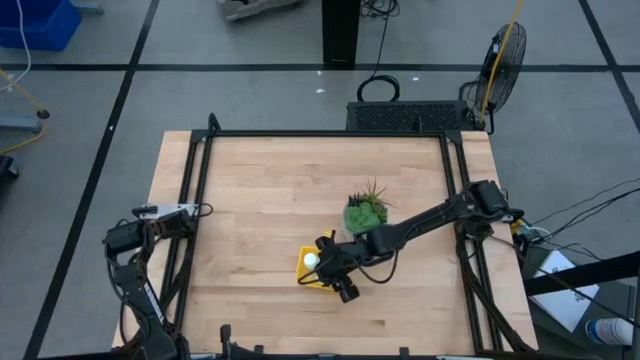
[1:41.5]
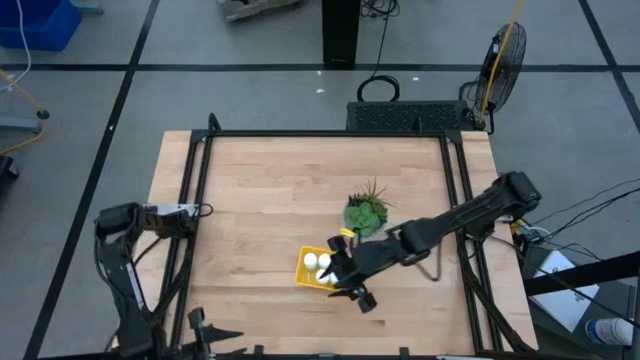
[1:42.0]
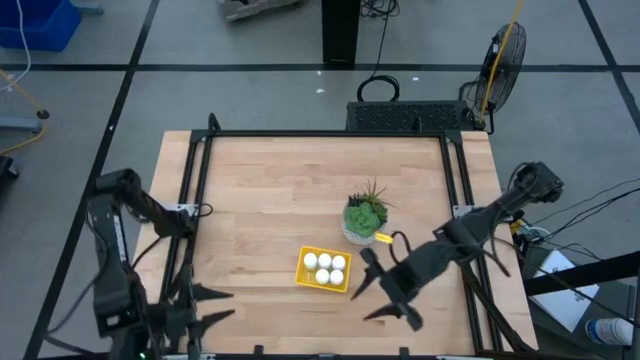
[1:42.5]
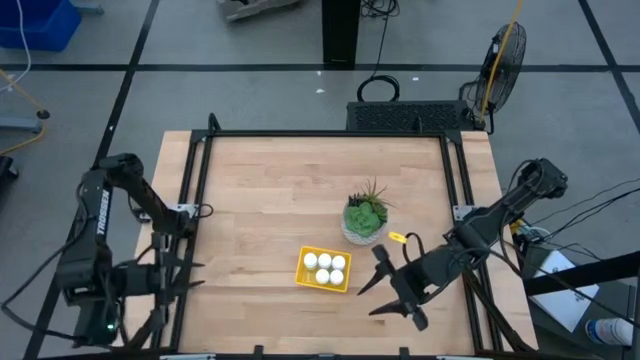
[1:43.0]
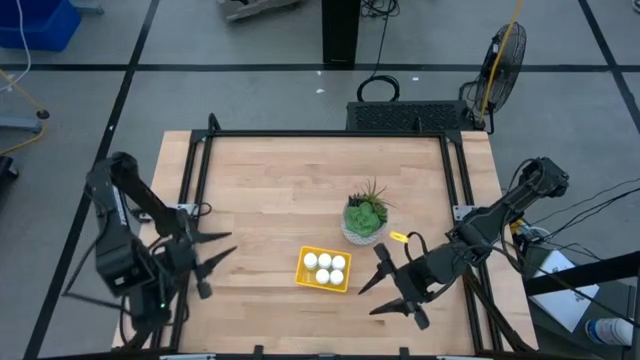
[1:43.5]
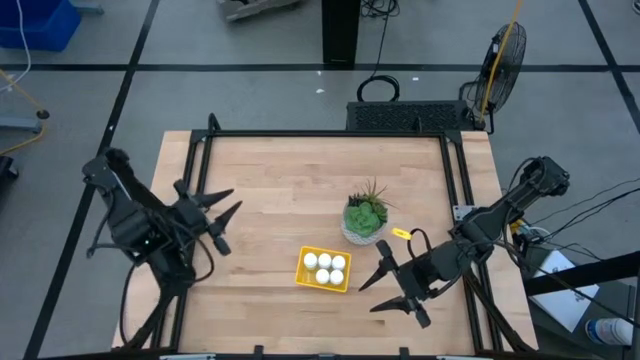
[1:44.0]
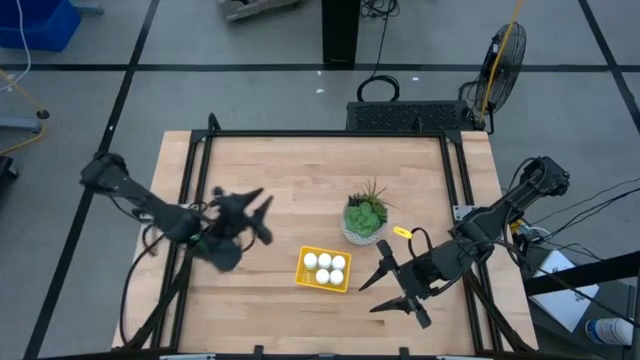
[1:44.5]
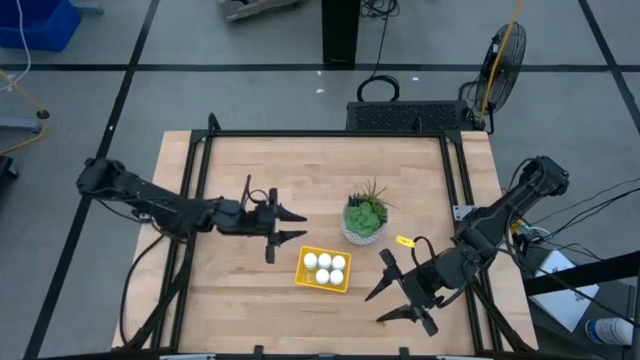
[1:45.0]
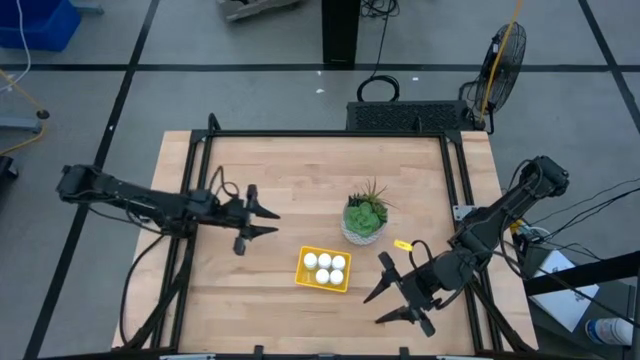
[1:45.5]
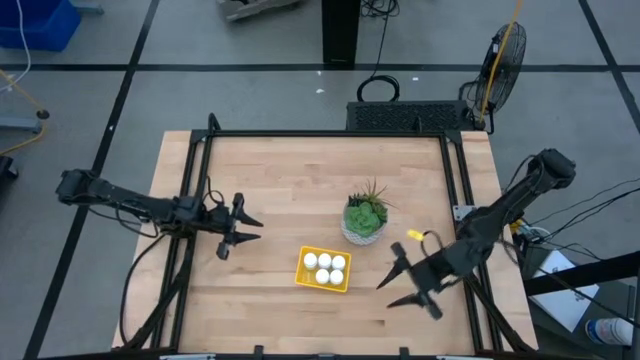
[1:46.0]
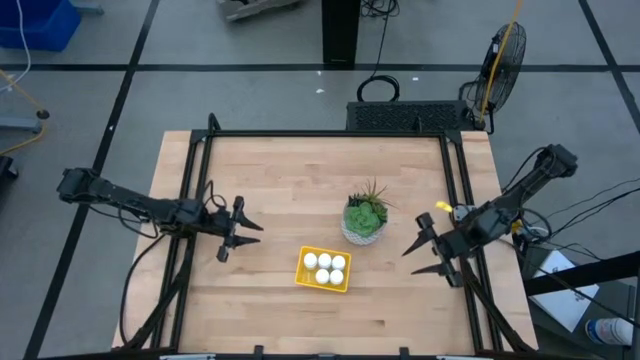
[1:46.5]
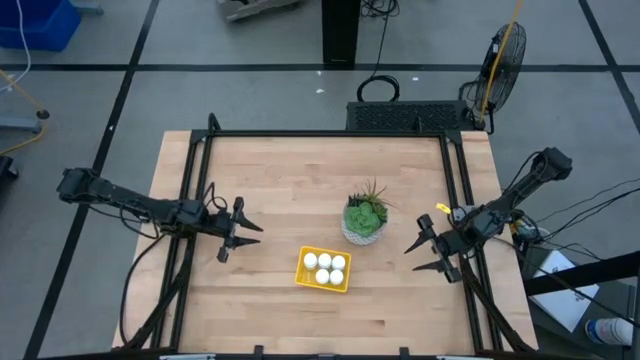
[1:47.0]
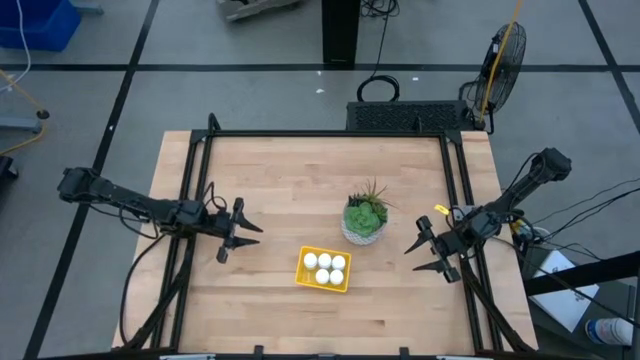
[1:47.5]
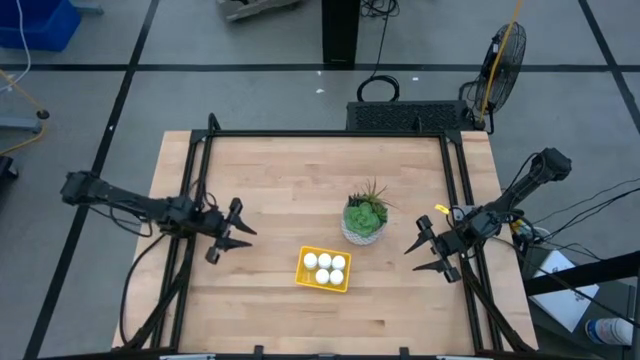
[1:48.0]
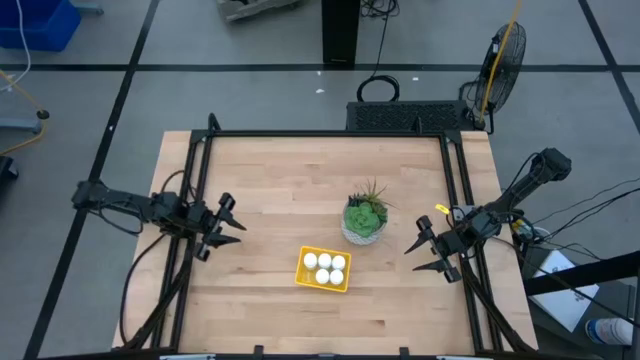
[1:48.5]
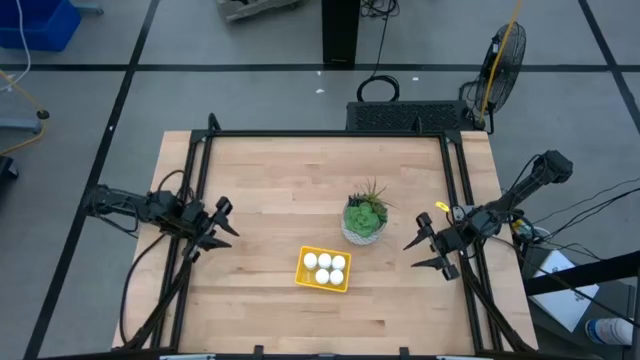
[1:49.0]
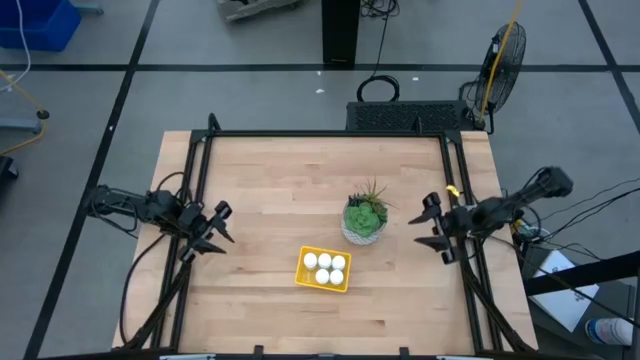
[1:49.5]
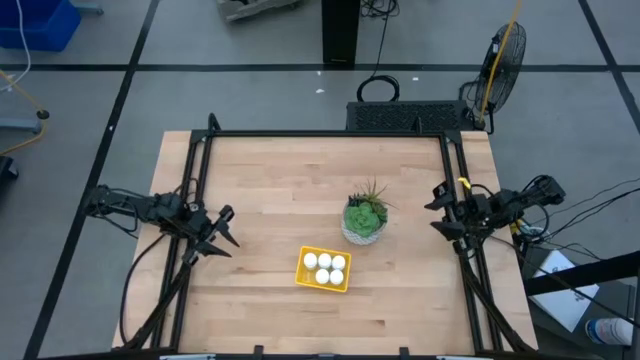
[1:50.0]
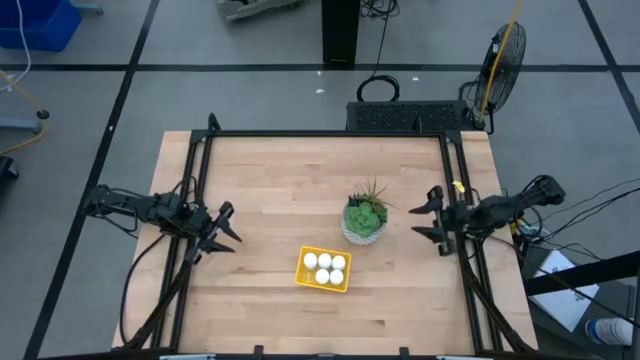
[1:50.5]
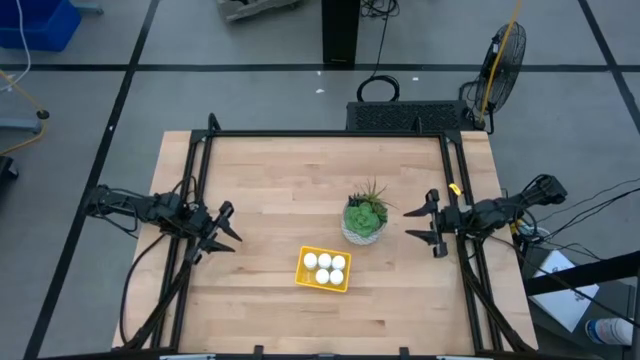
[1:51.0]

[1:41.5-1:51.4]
Task: Pick and place pill bottles into a basket
Return to Home Position

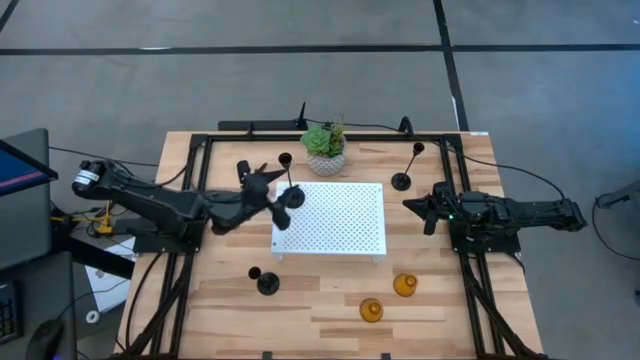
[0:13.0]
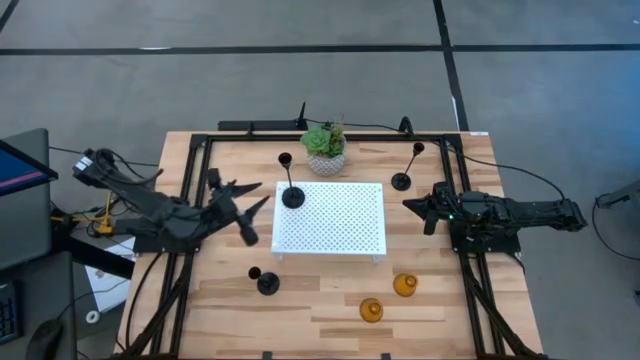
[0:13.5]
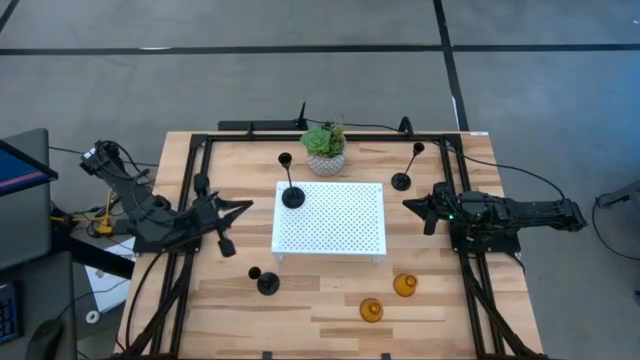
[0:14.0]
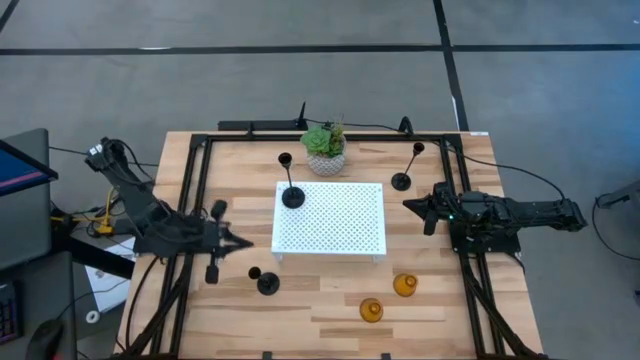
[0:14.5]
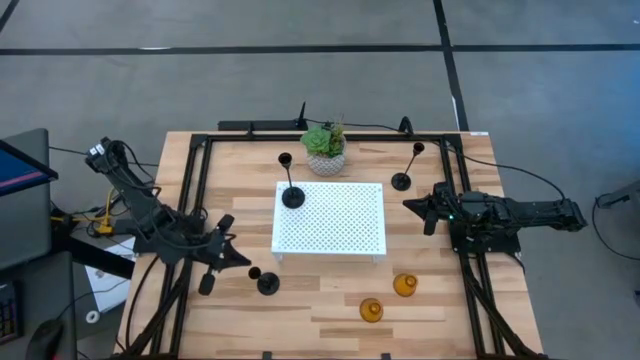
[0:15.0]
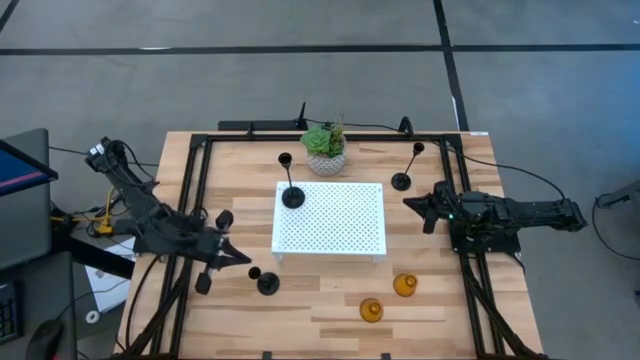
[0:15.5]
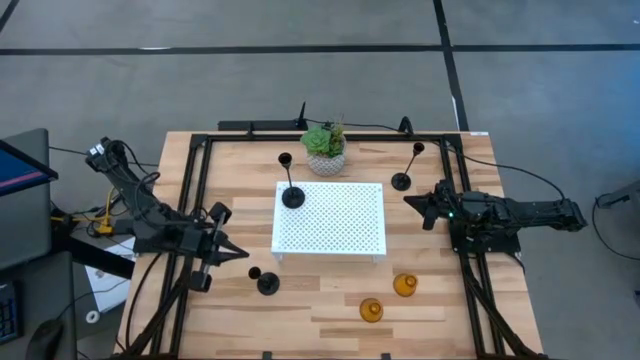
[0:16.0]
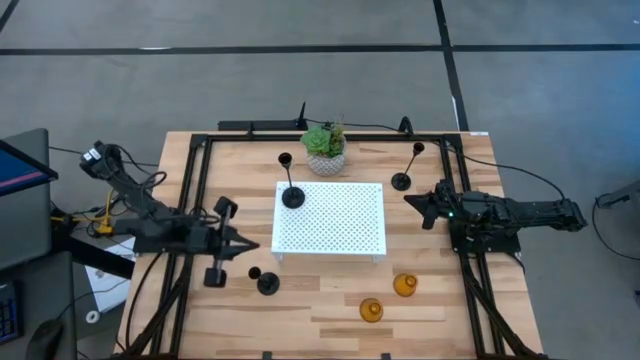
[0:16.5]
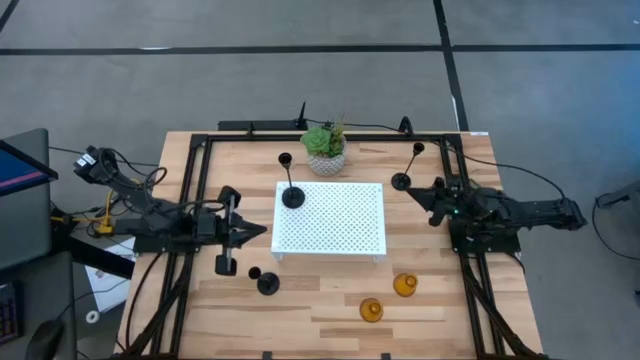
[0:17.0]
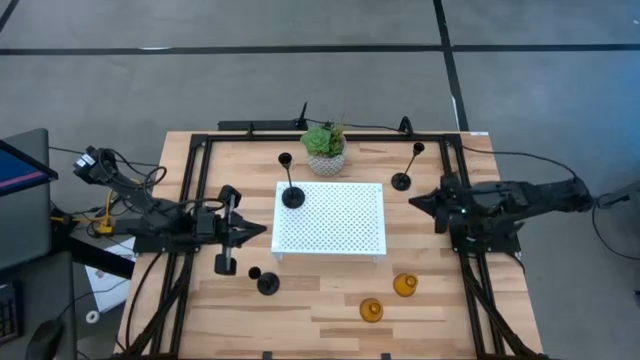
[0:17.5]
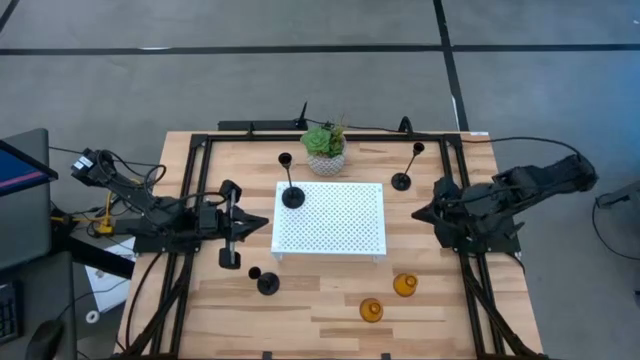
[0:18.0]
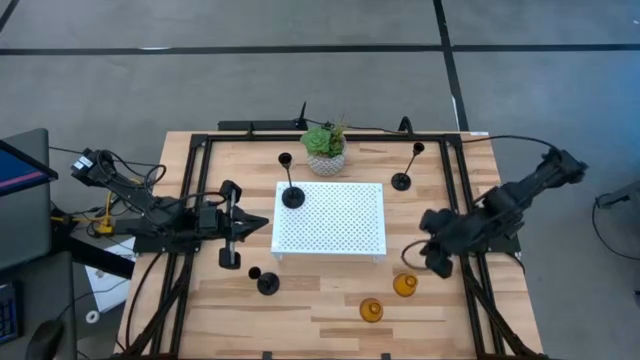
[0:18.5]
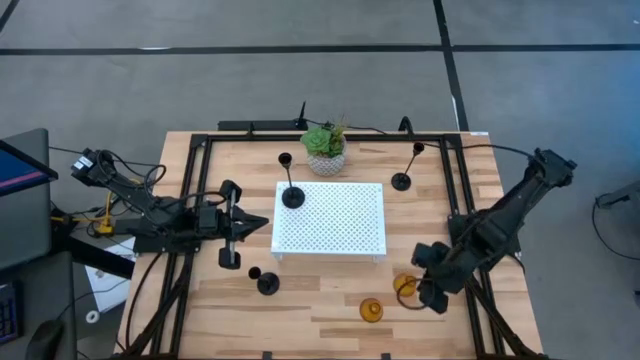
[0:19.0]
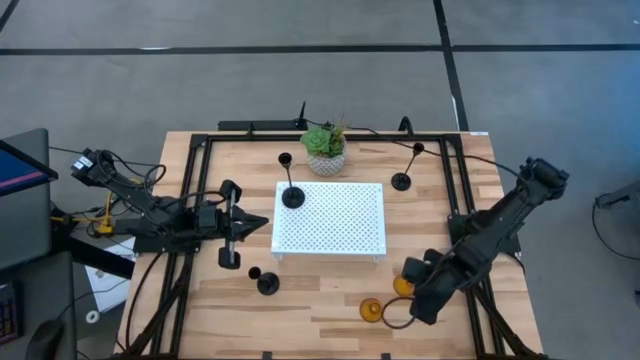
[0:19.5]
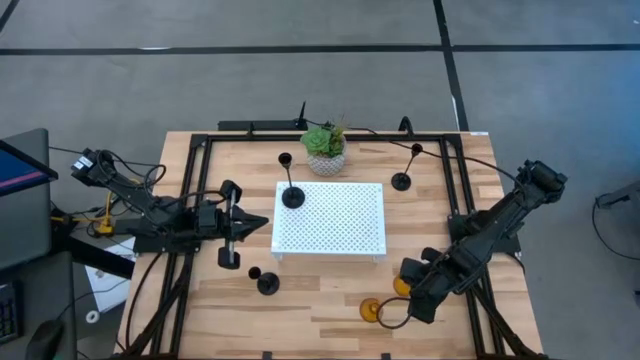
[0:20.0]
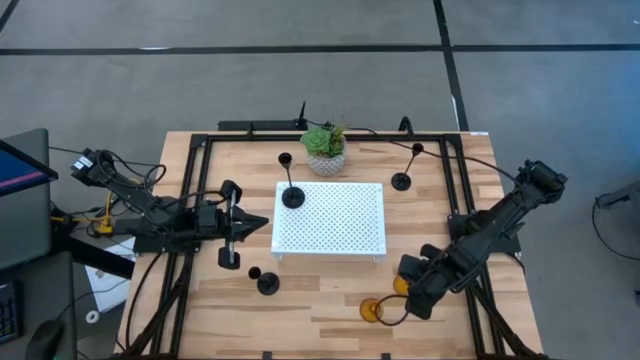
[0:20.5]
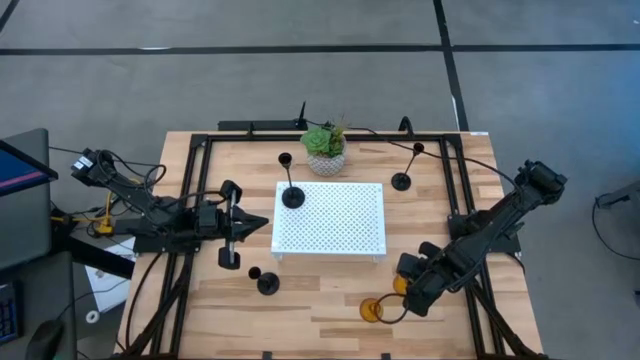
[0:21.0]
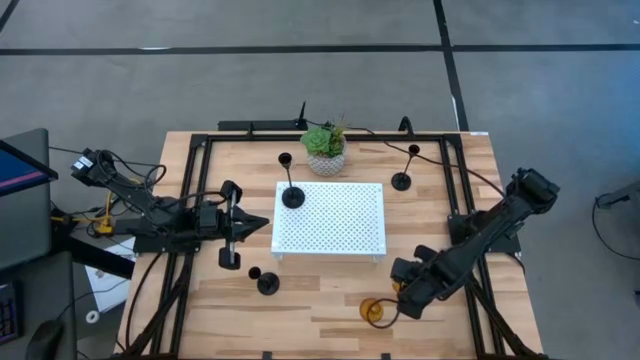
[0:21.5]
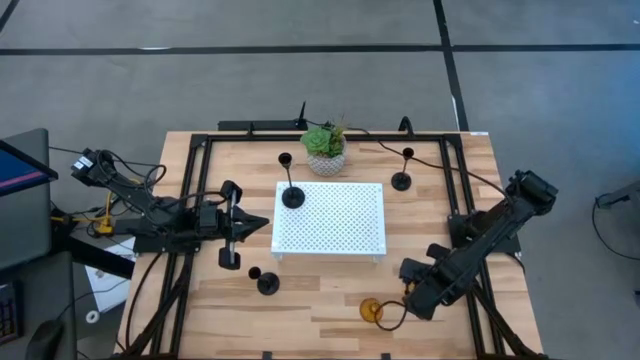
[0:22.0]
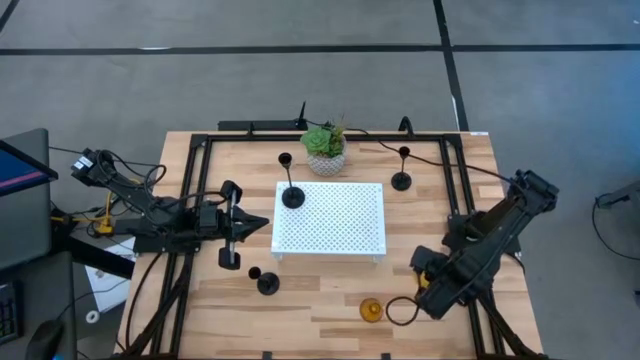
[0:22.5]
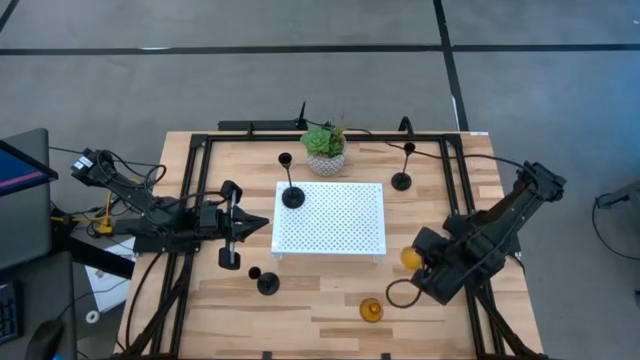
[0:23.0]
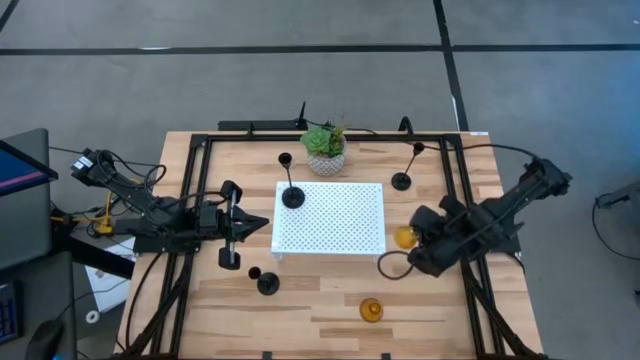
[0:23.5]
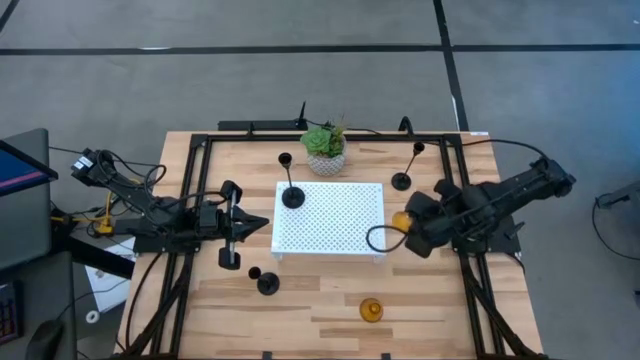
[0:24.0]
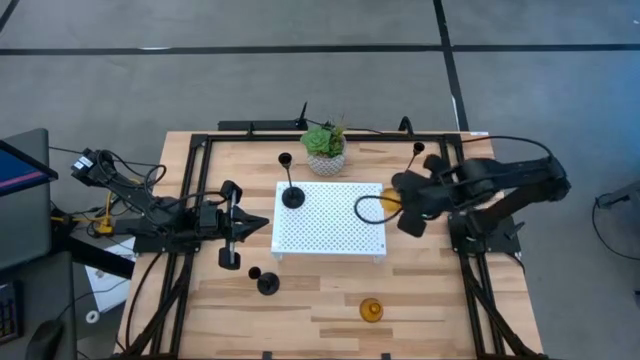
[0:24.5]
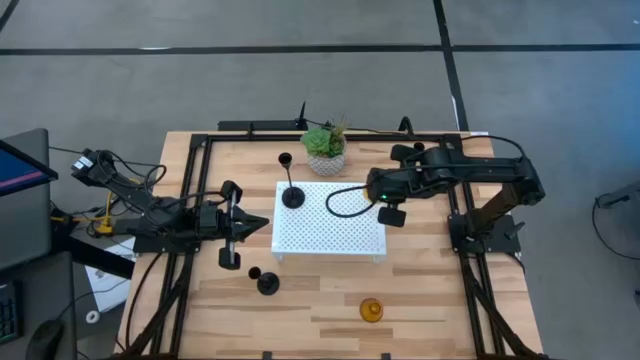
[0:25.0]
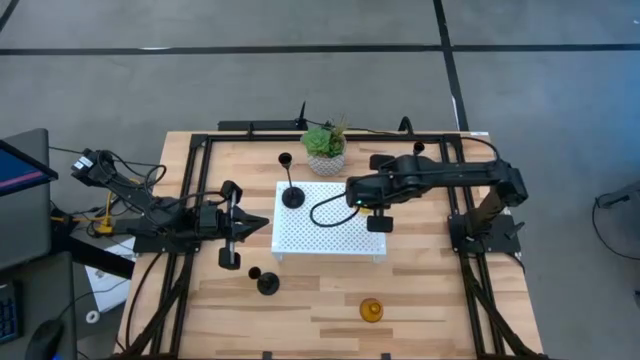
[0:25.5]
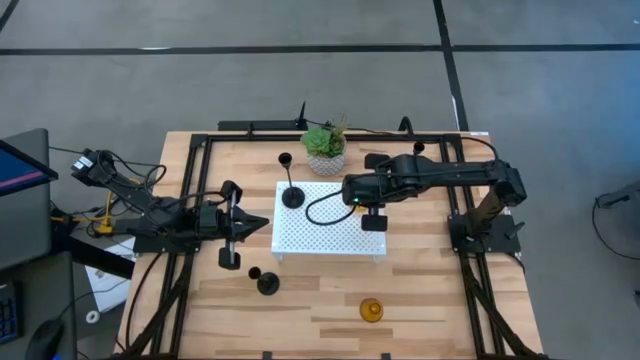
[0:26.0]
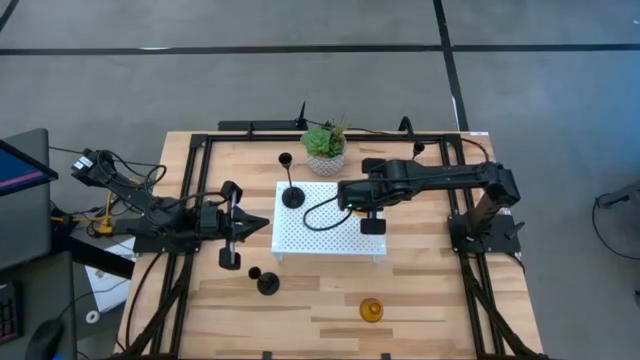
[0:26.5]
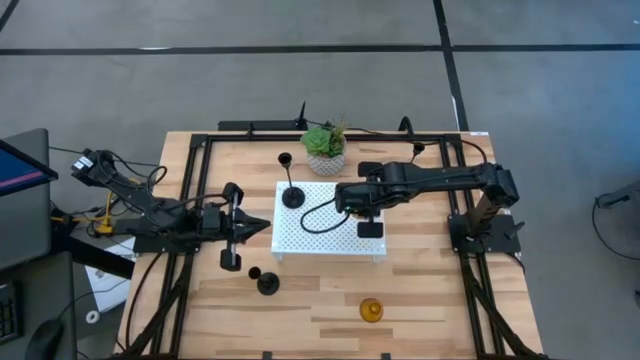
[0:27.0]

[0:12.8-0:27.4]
Task: Pick & Place candle stick holders
Put the top gold vase on the shelf
